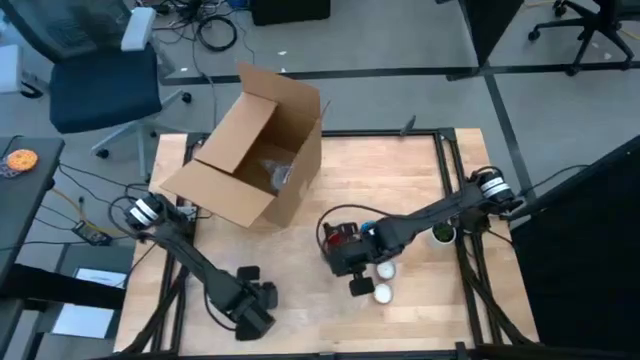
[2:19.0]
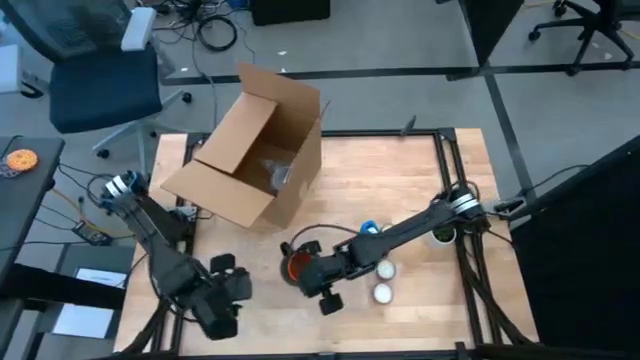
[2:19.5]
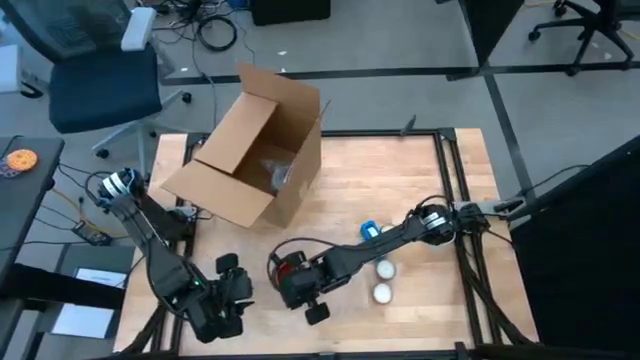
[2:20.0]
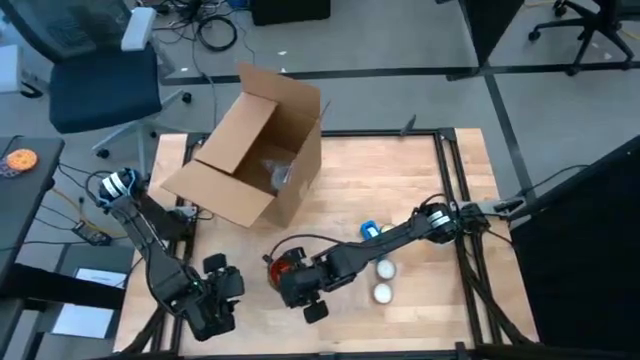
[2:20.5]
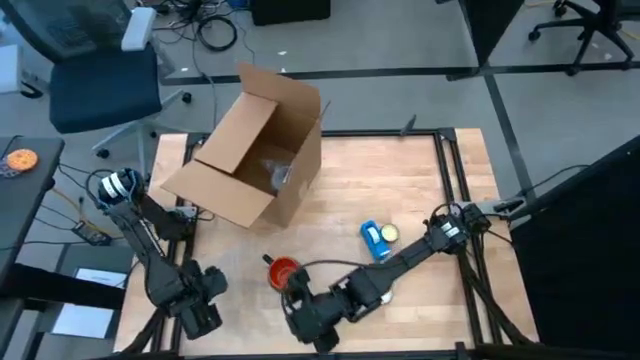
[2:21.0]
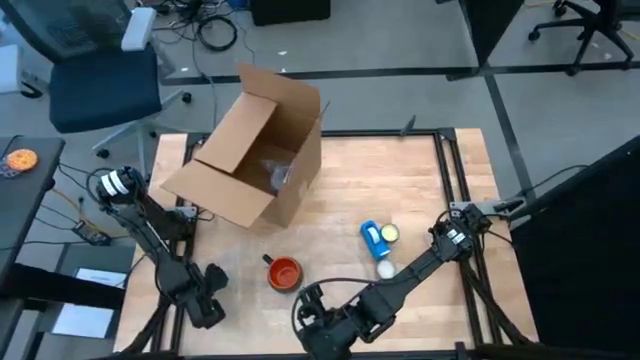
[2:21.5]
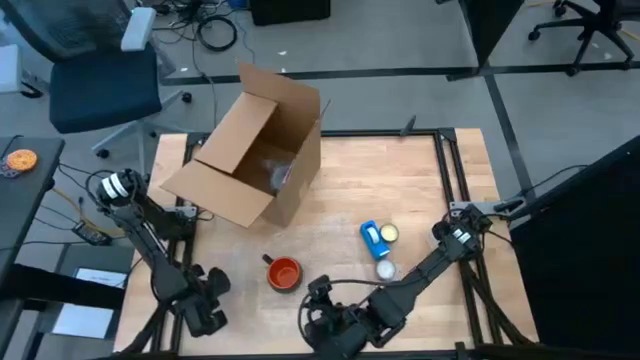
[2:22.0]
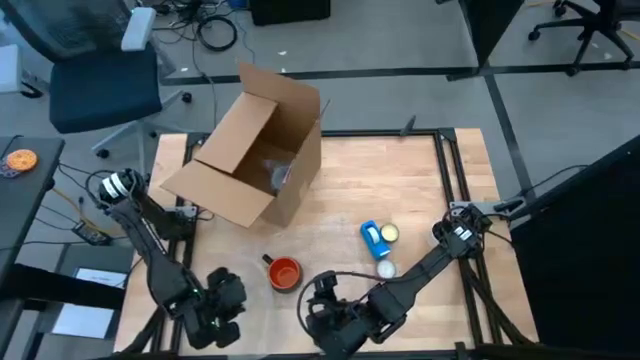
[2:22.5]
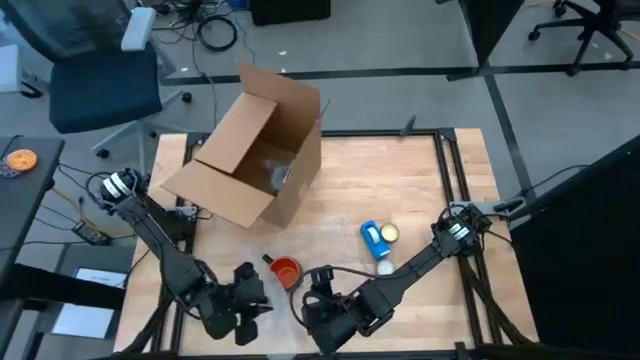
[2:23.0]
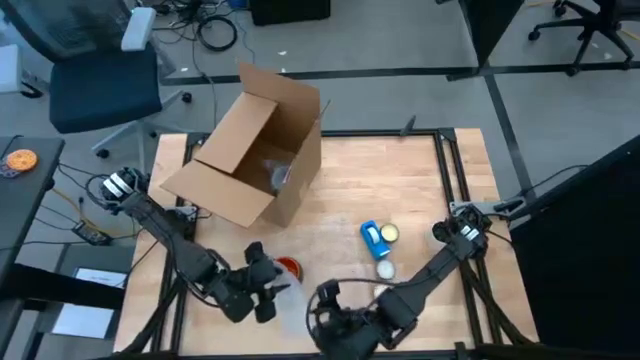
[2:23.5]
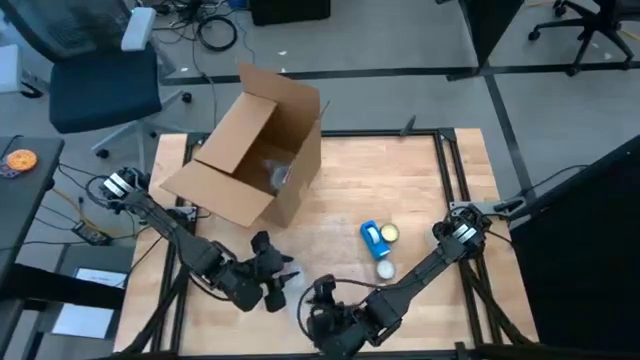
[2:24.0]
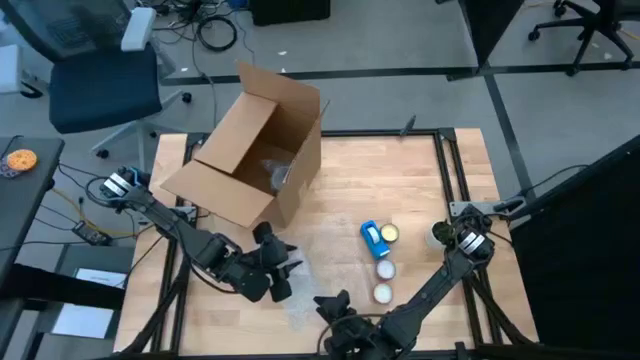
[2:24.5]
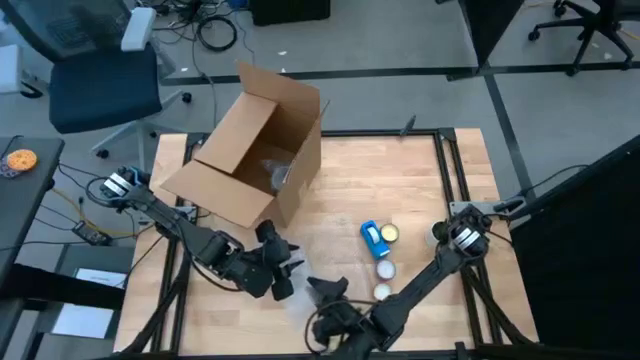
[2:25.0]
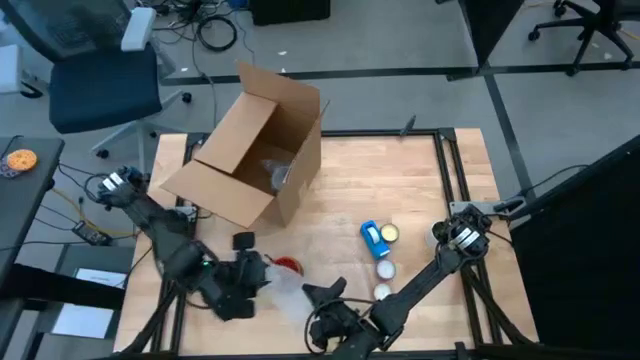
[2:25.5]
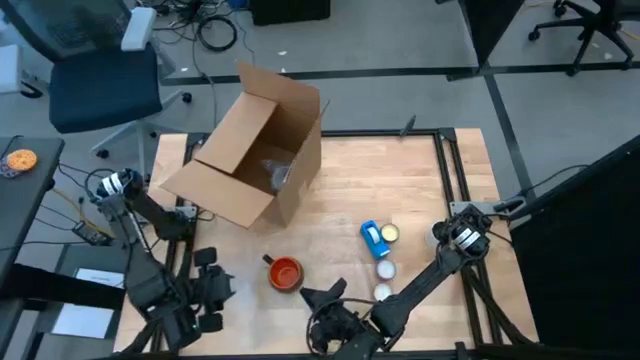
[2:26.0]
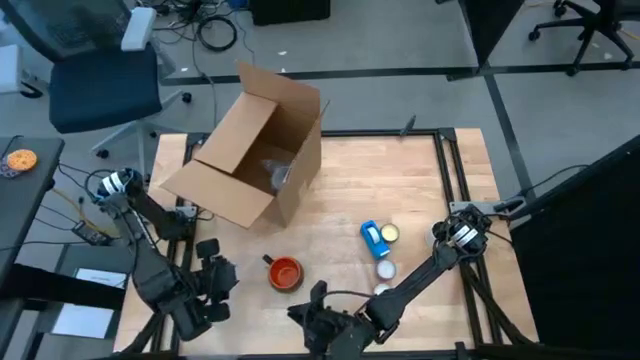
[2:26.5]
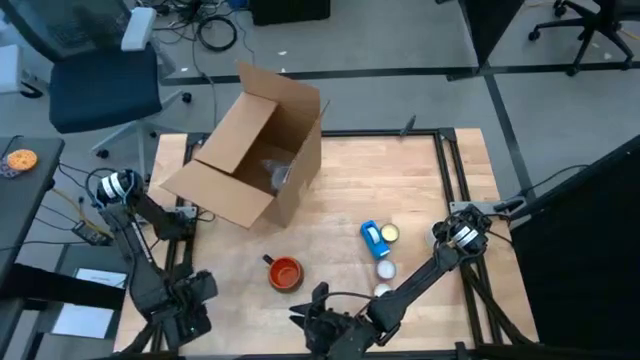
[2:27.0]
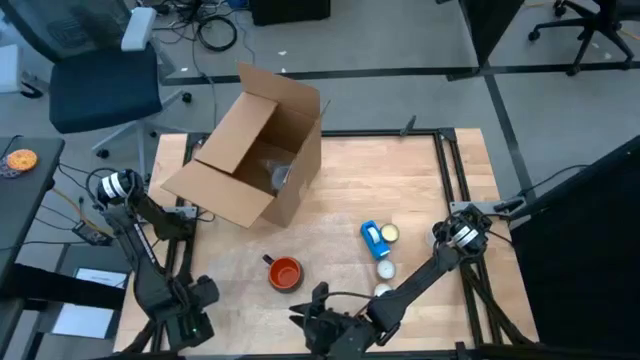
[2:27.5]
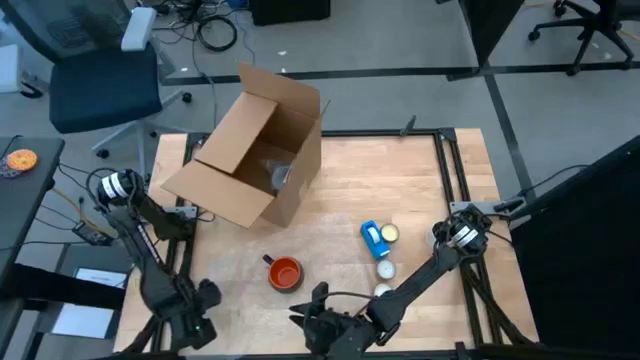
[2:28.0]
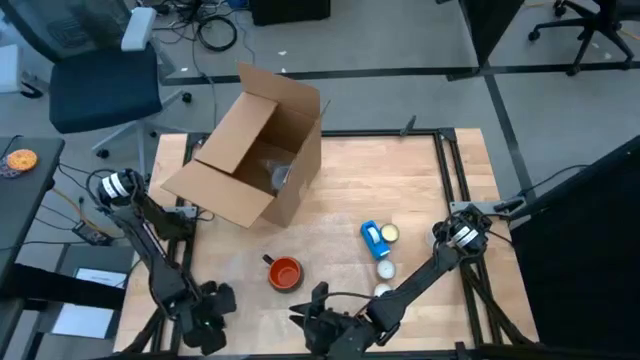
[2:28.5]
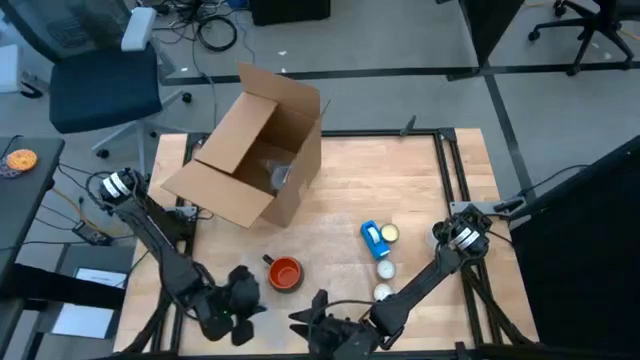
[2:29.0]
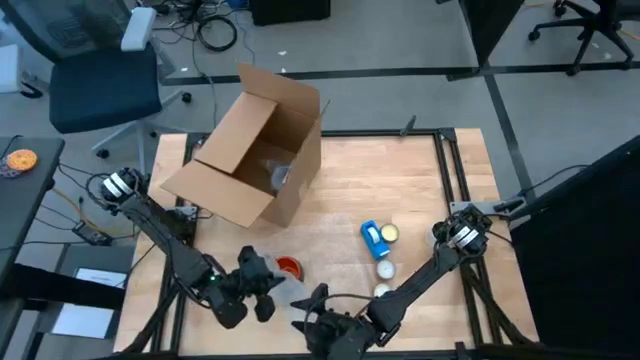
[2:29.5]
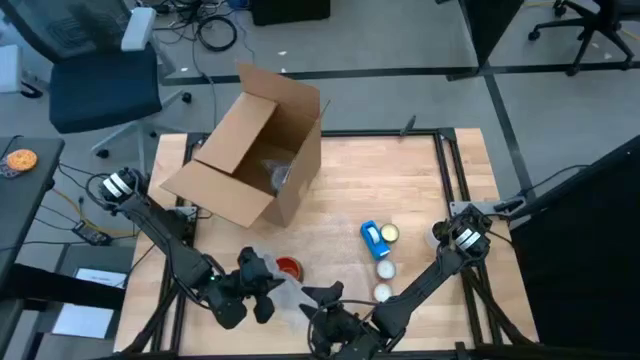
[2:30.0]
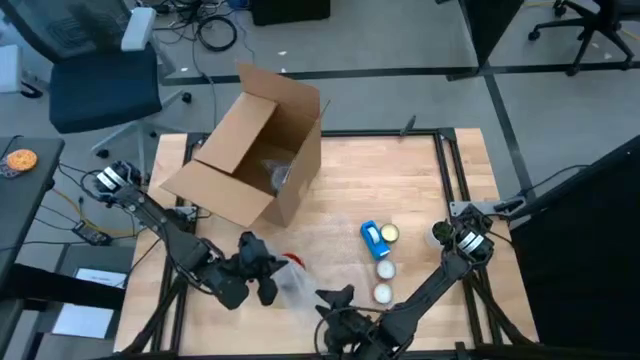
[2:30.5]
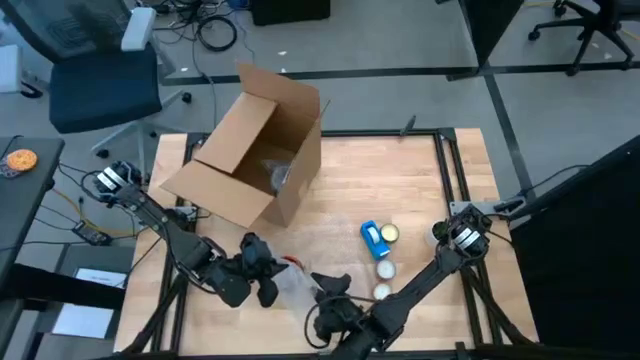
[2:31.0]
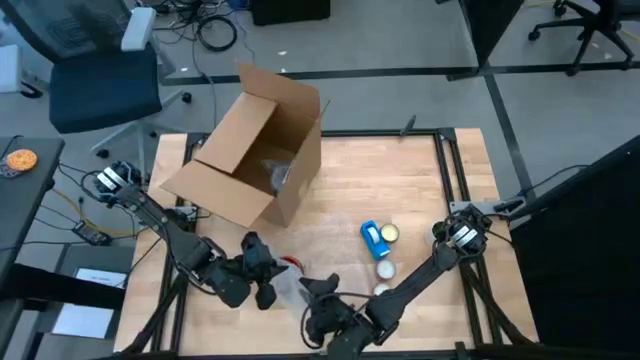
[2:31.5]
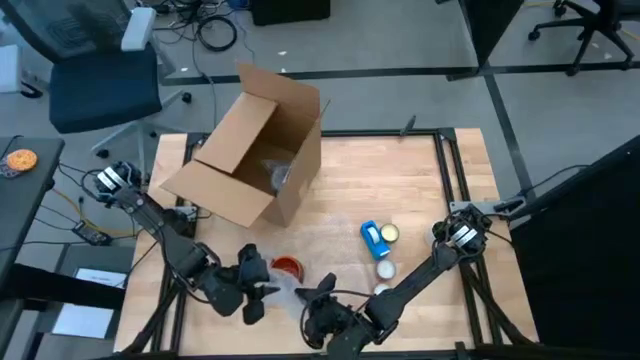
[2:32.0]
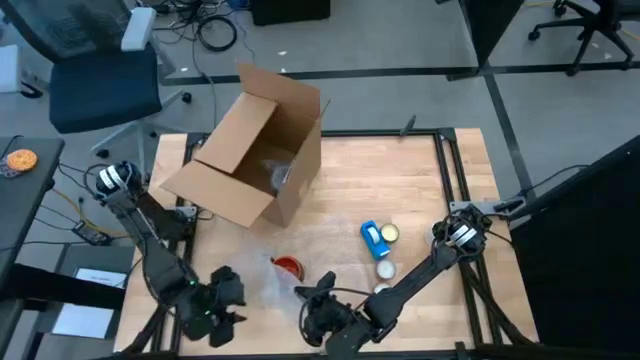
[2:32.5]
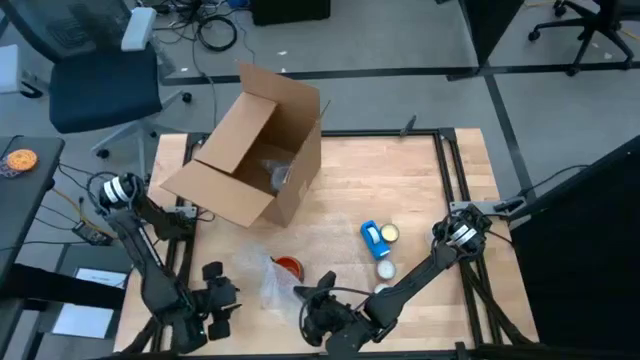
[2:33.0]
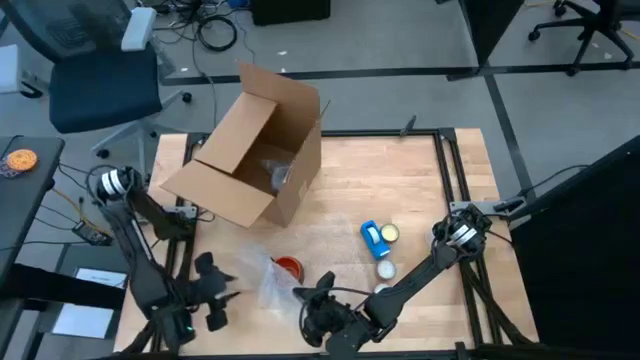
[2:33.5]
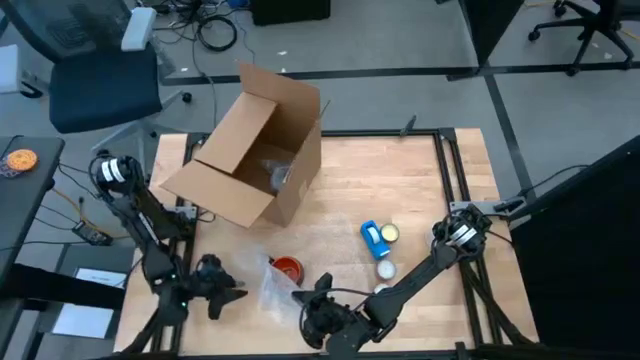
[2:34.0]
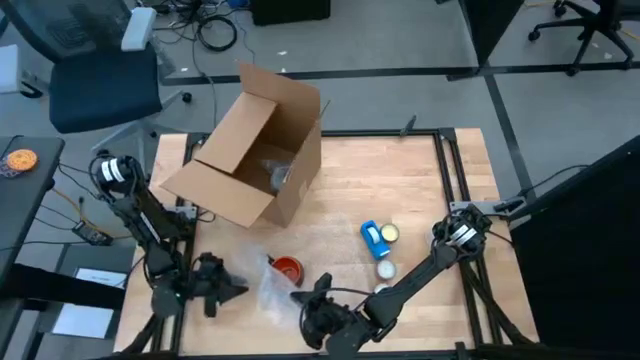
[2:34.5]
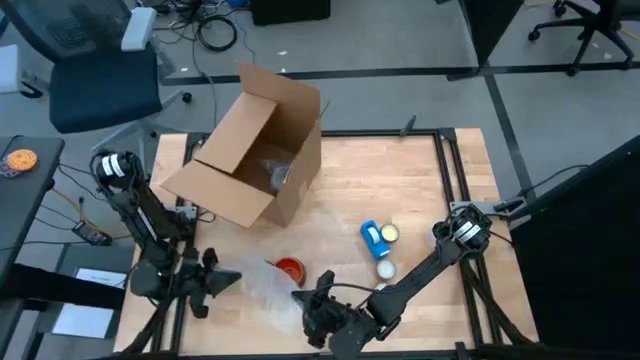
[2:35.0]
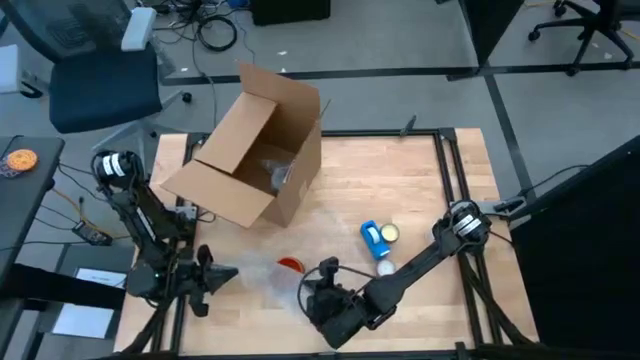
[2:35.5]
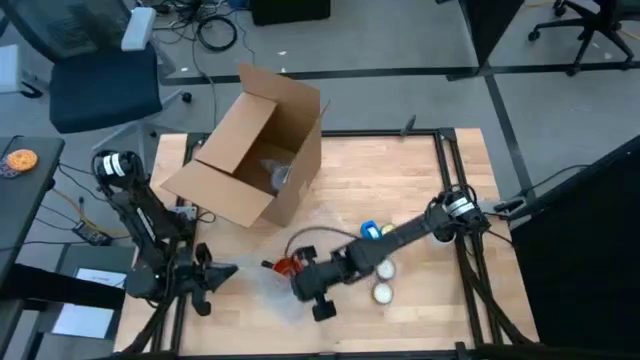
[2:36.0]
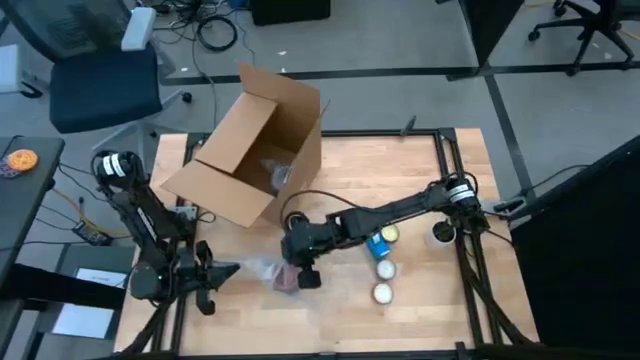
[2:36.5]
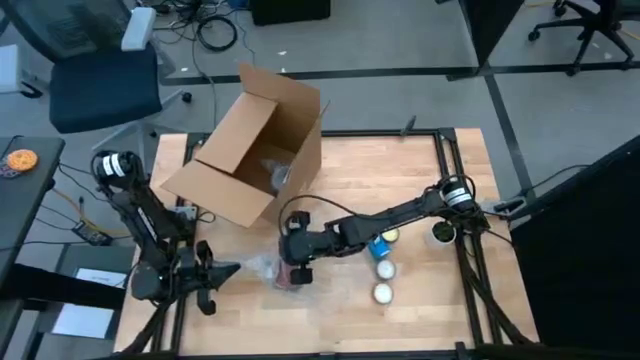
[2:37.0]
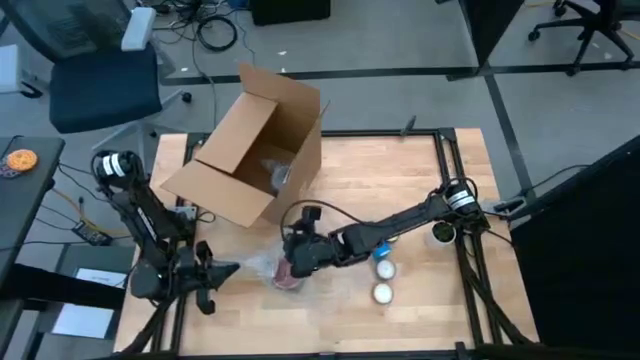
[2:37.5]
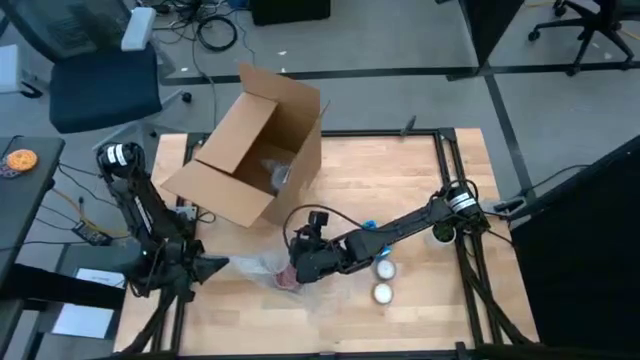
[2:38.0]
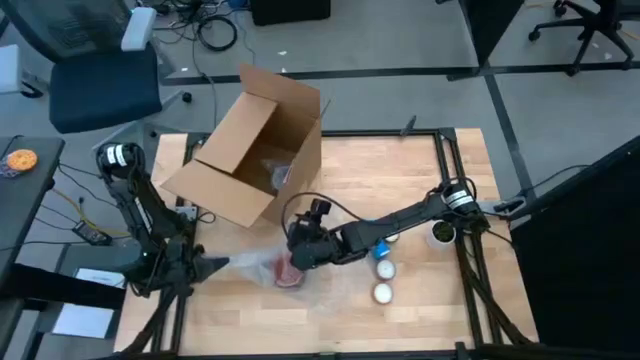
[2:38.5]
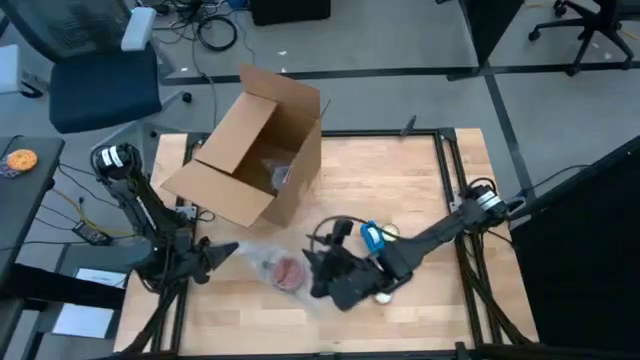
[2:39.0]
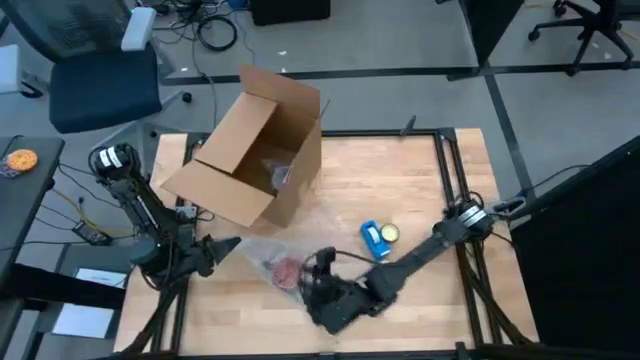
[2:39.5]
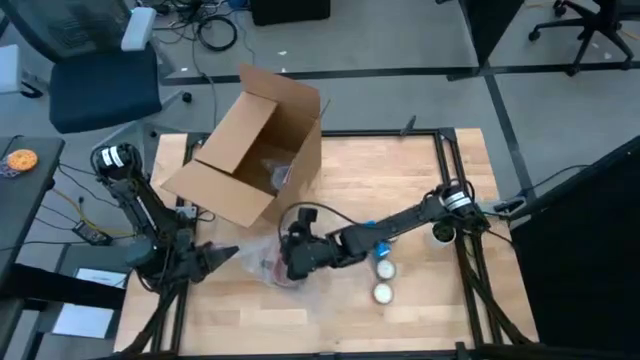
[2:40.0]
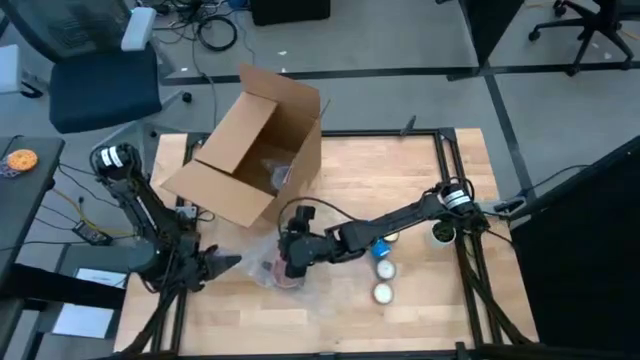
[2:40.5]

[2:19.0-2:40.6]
Task: wrap mug
Wrap the mug with the bubble wrap
